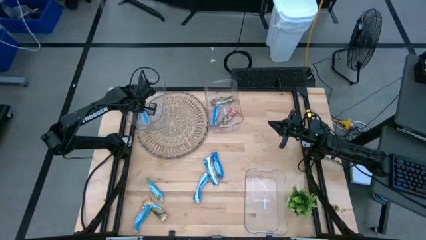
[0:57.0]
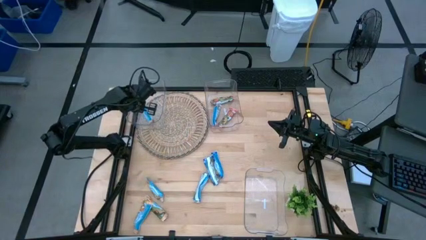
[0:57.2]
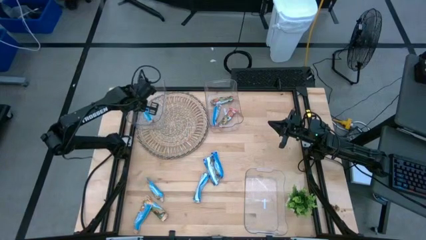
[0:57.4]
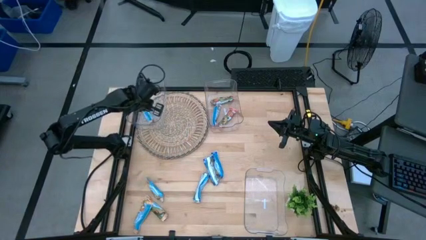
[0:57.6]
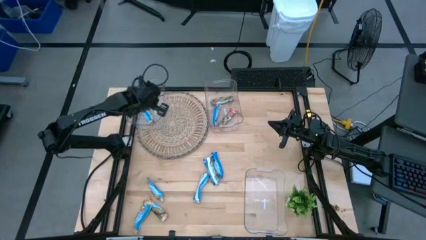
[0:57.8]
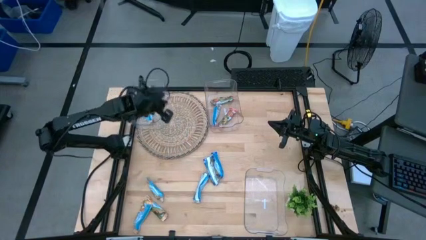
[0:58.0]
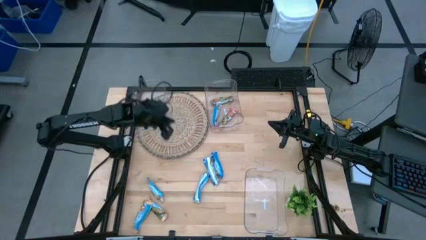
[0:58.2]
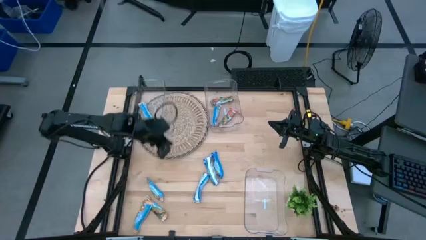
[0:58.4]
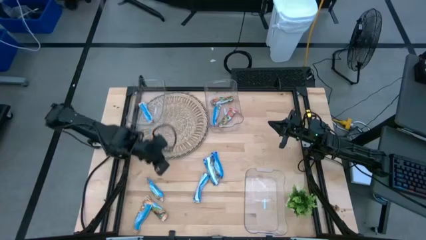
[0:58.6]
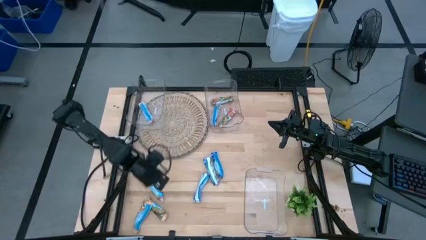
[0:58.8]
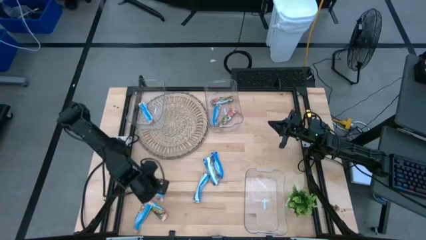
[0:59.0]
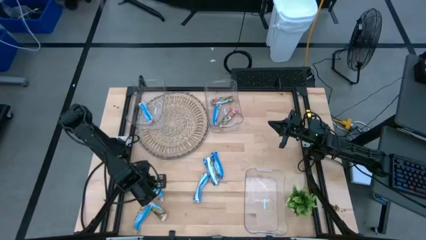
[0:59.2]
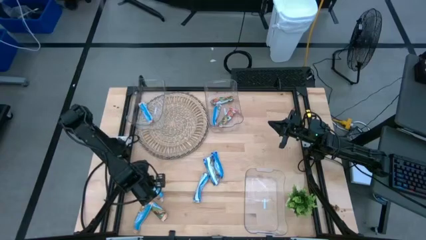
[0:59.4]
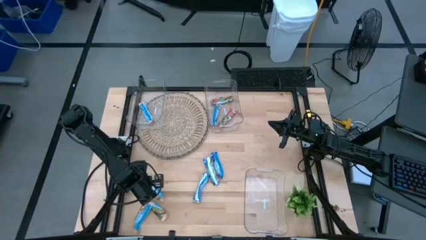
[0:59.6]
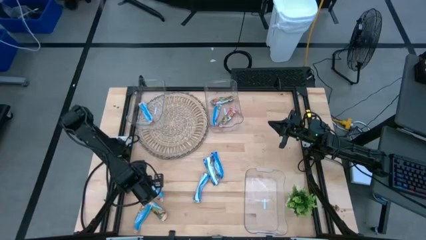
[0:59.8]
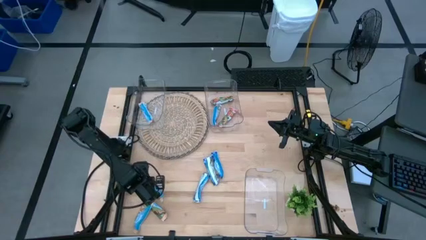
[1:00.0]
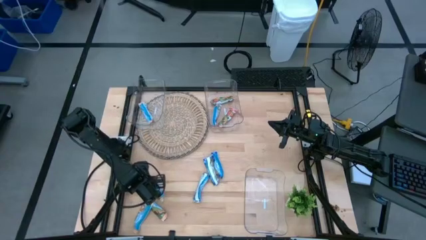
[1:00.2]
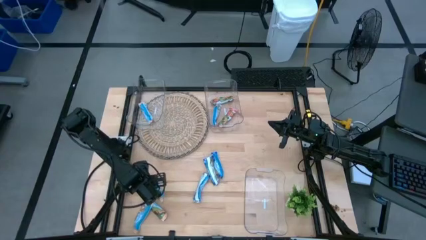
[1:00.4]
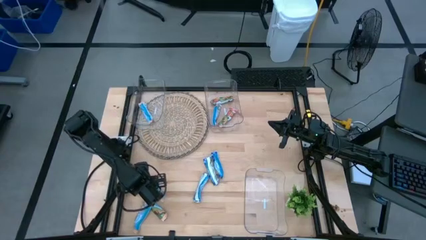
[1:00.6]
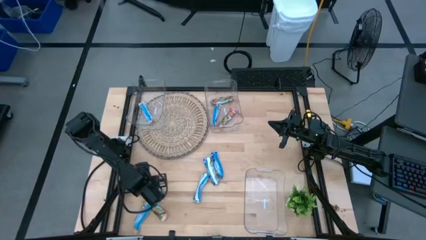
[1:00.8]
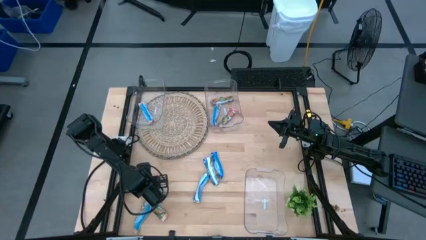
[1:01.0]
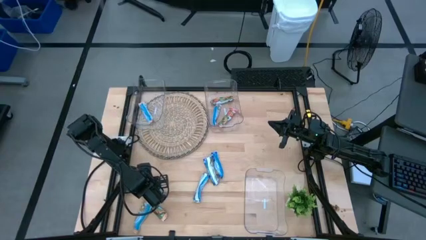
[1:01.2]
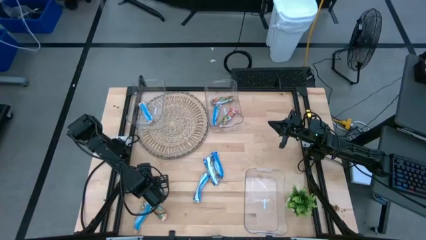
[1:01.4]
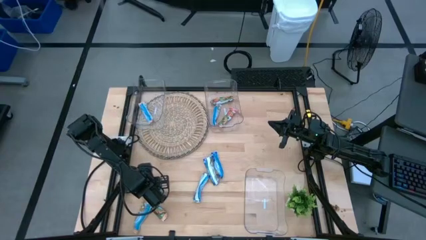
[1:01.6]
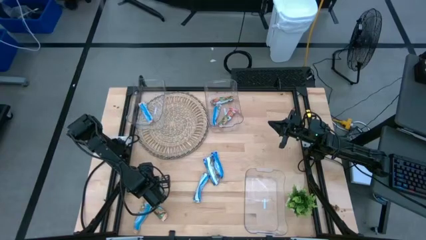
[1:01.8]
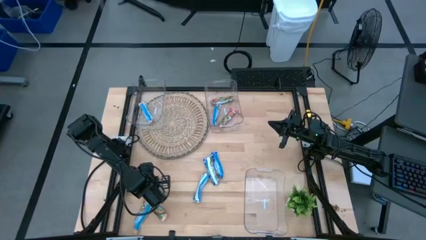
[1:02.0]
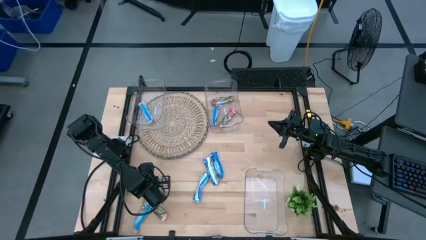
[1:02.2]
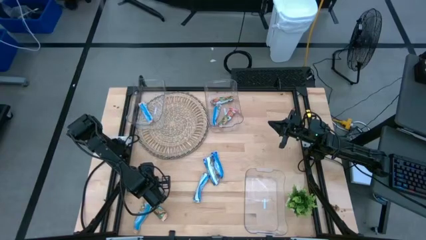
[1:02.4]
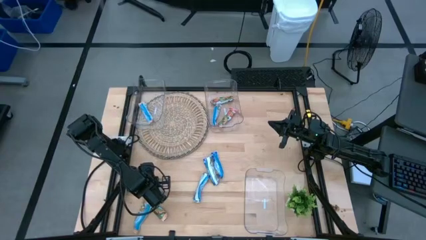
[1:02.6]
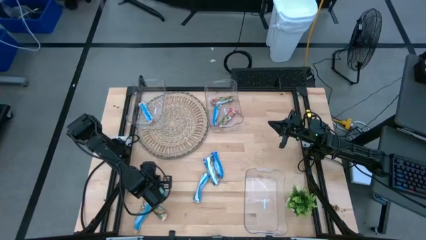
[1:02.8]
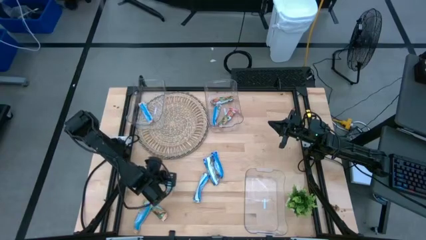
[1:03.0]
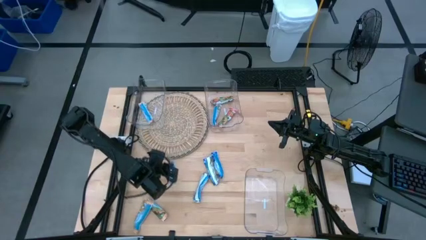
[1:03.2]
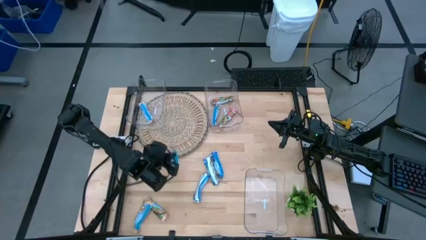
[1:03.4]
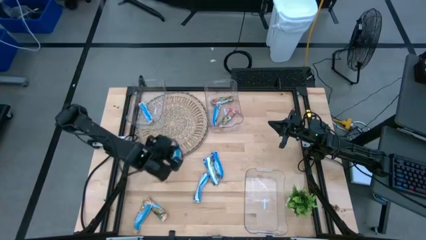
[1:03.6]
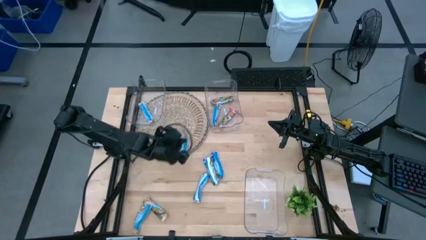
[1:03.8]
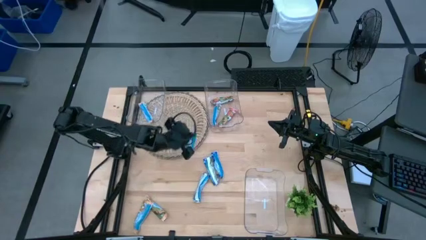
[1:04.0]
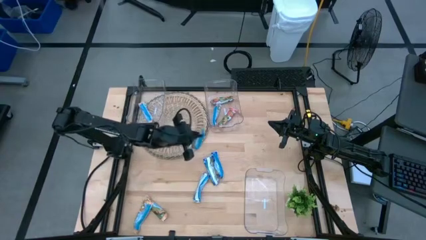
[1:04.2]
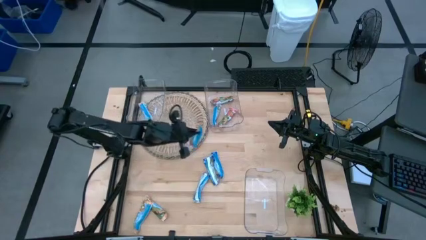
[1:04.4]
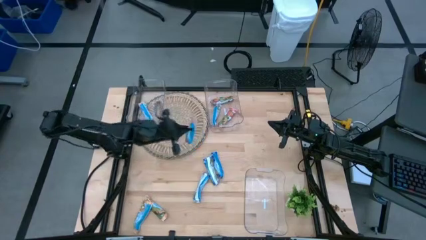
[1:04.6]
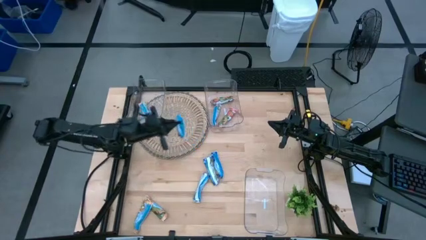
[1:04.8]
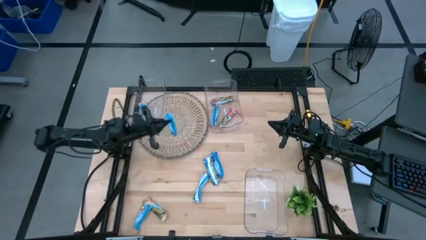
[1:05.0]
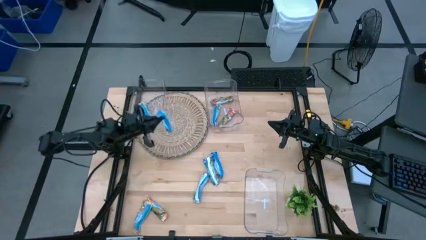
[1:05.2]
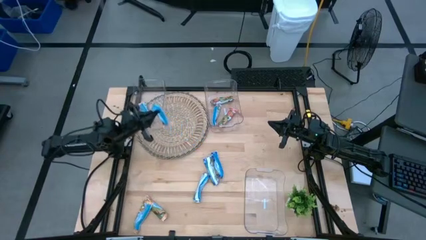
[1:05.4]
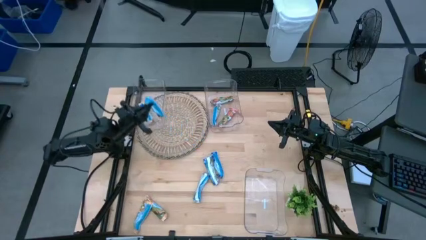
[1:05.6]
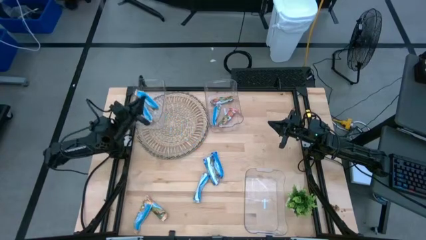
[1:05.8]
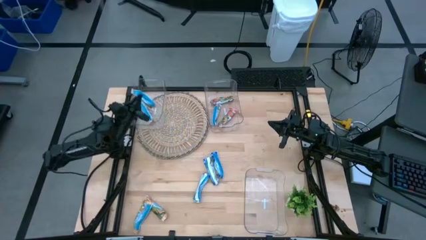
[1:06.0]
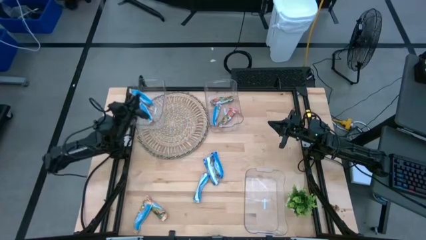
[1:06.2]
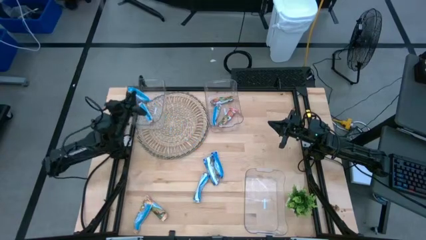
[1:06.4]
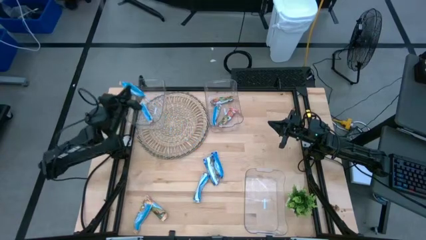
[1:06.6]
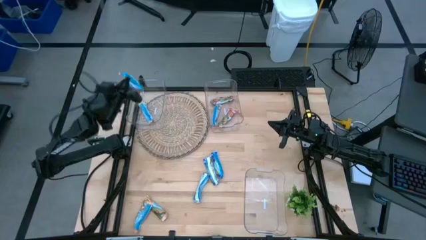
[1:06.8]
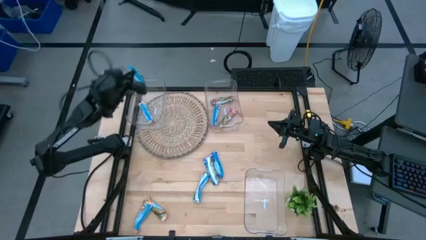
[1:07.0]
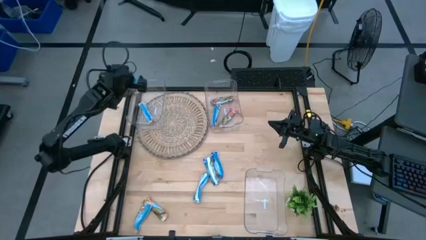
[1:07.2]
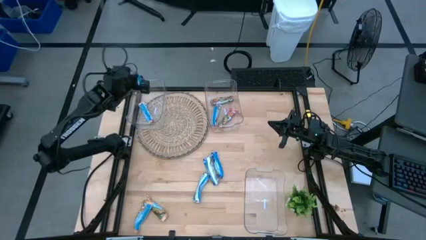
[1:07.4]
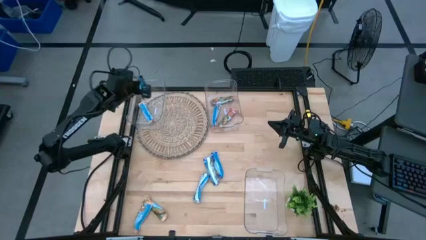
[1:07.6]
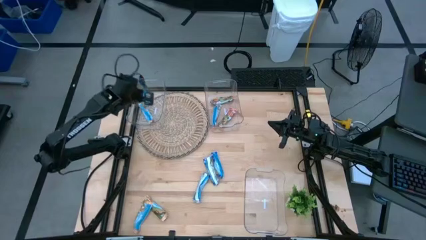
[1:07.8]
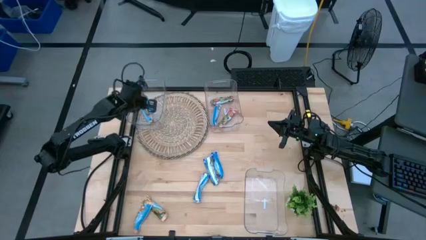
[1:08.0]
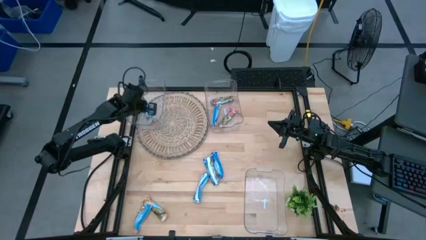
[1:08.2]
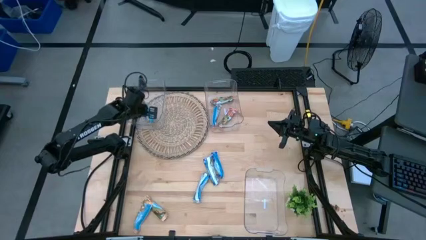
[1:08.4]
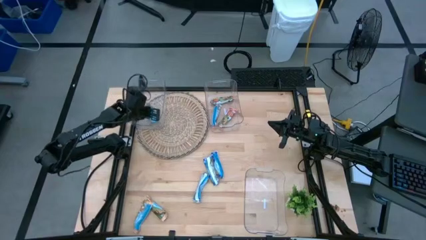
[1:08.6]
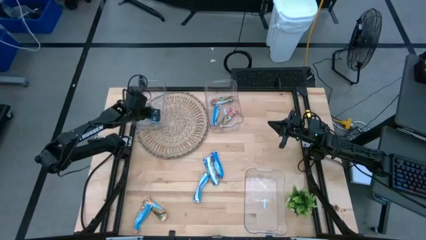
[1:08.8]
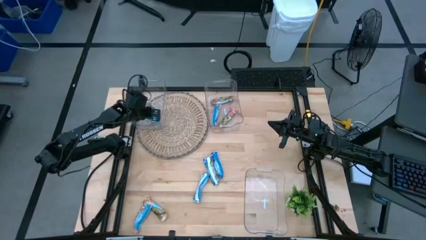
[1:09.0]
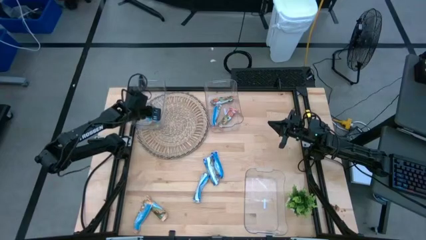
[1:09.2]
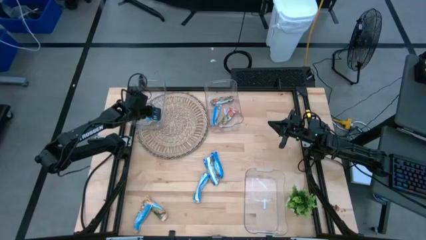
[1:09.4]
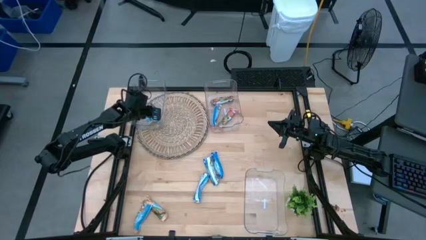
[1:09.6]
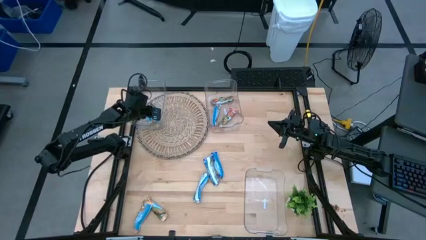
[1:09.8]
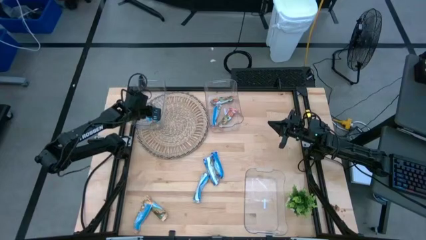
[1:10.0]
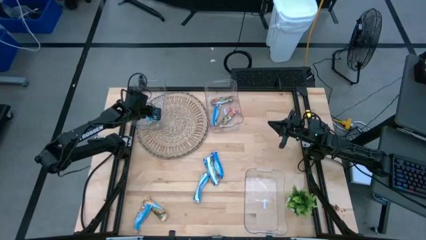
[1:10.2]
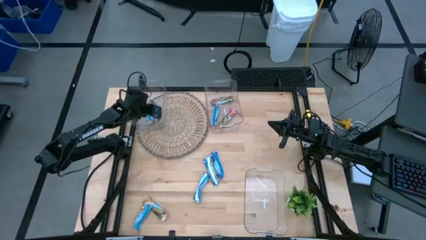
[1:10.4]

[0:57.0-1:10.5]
Task: Pick and place Granola Bars by type
Put the yellow granola bar into the top left transparent bin

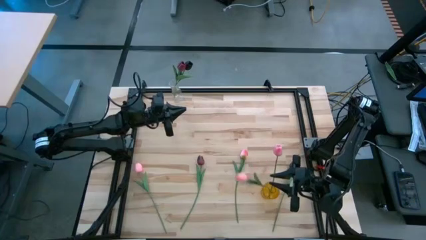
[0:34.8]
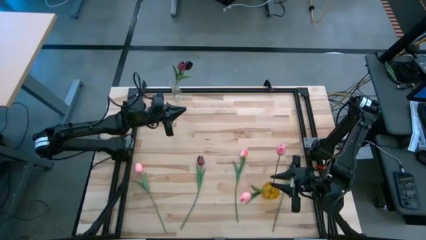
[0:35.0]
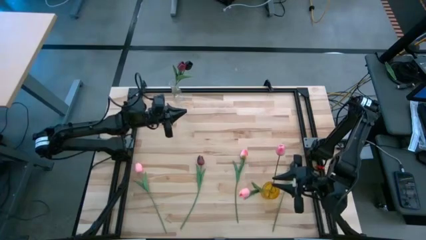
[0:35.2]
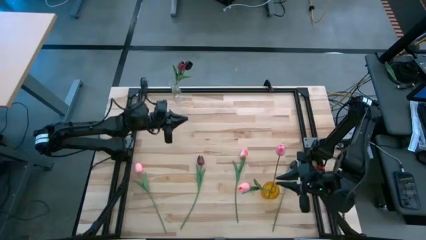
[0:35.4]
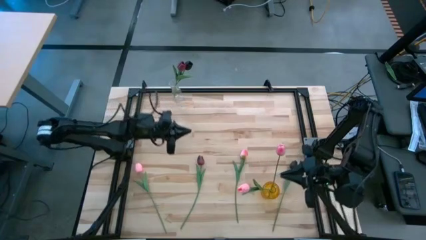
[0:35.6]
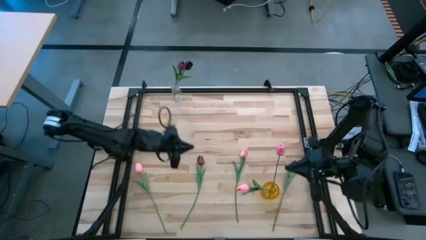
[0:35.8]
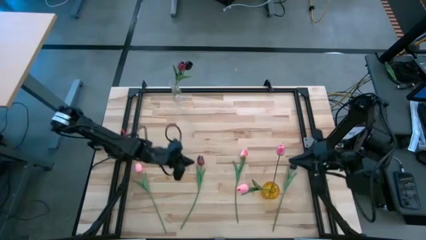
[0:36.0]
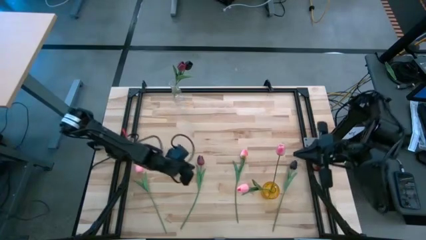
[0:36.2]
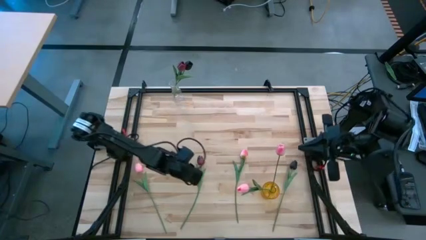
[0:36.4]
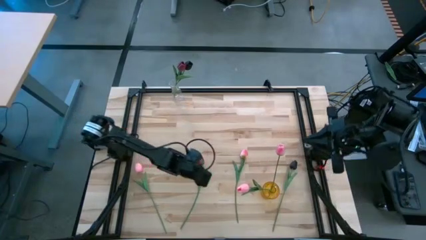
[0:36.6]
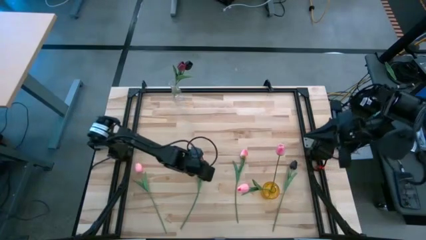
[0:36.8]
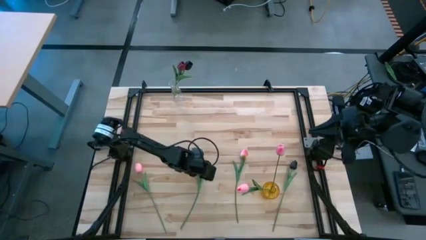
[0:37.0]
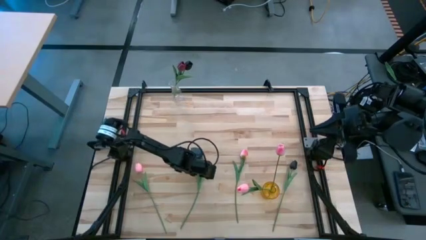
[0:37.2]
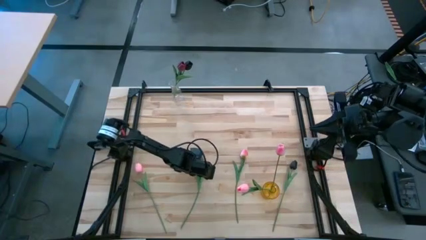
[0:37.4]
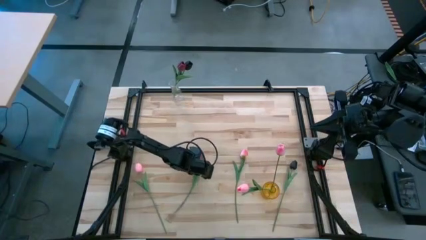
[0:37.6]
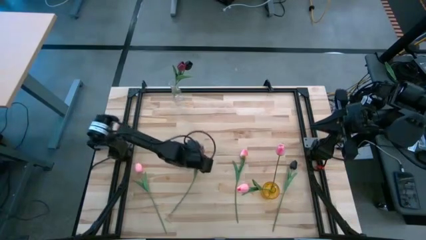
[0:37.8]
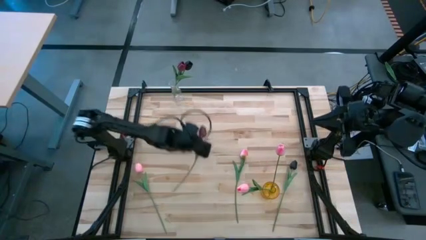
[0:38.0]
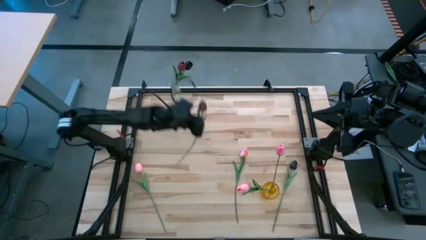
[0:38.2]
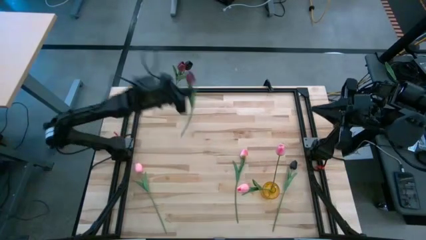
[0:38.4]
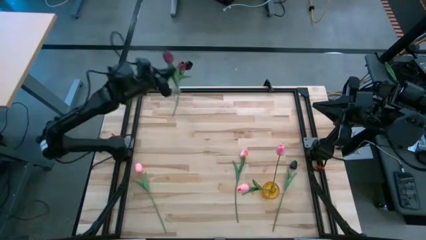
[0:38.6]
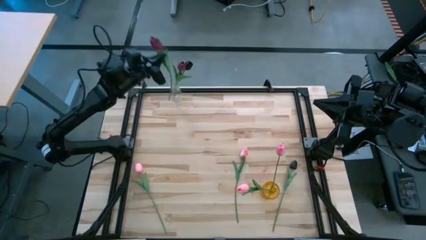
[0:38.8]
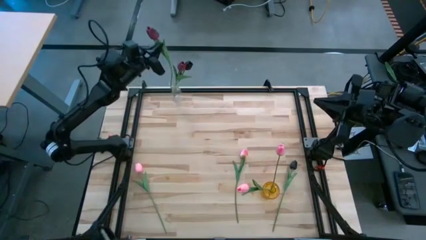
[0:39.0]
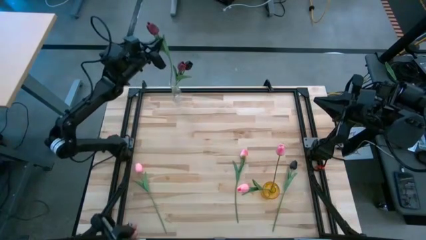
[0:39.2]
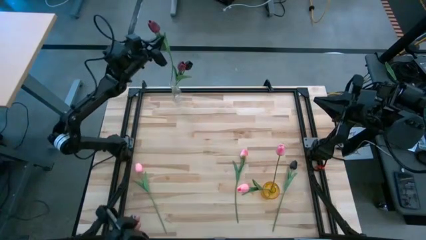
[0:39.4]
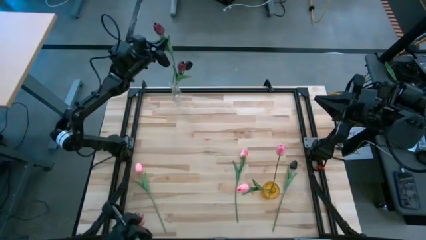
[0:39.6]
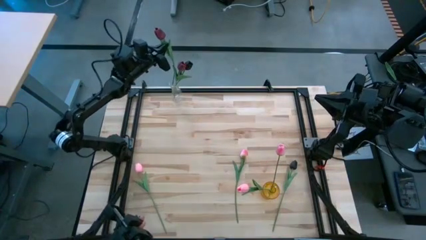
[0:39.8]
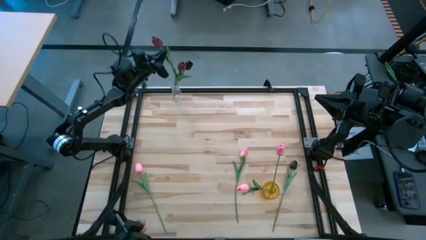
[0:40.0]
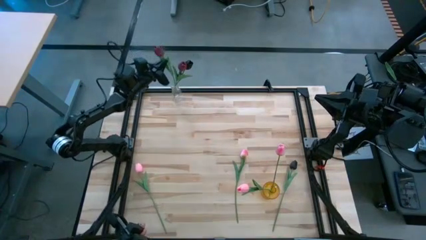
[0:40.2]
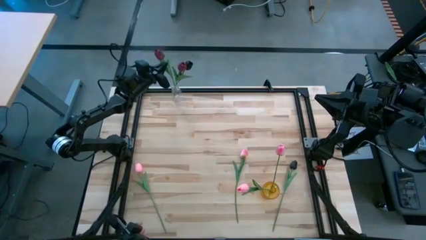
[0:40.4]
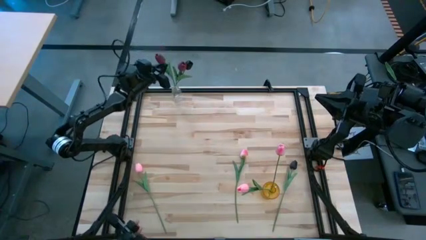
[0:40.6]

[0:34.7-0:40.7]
Task: Sort flowers into vase by color
Put the red flower into the transparent flower vase
